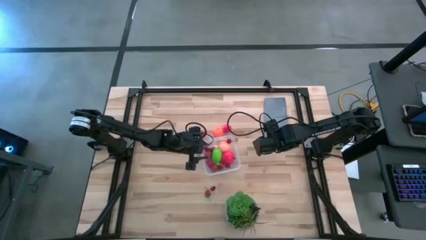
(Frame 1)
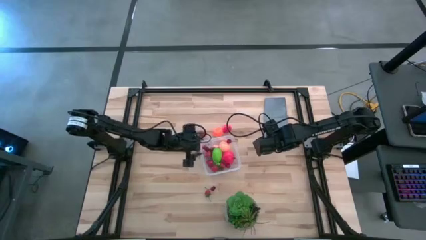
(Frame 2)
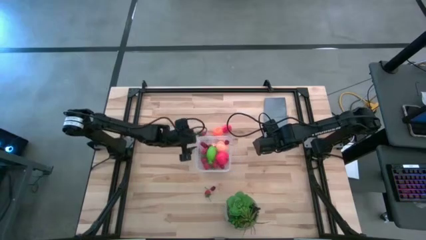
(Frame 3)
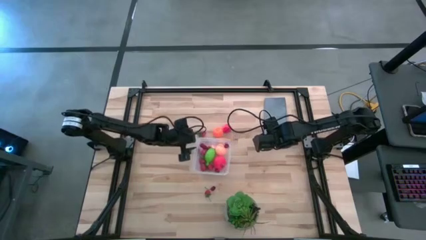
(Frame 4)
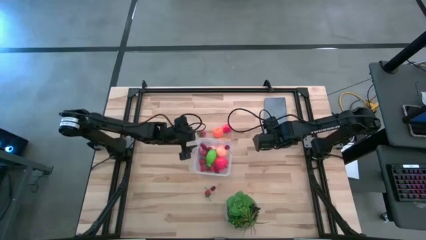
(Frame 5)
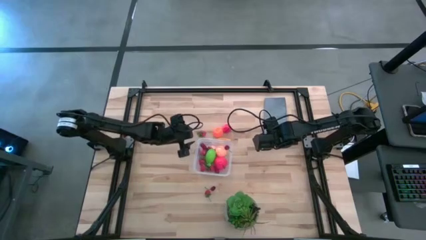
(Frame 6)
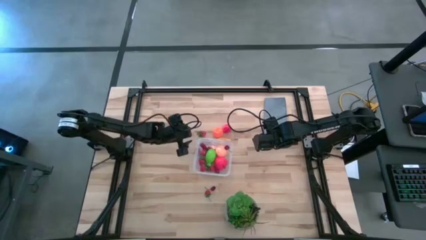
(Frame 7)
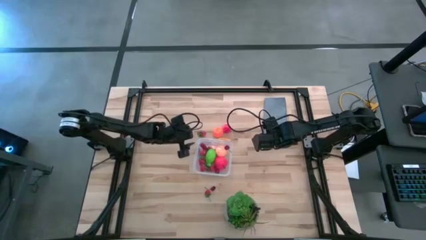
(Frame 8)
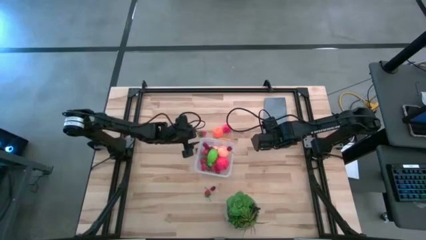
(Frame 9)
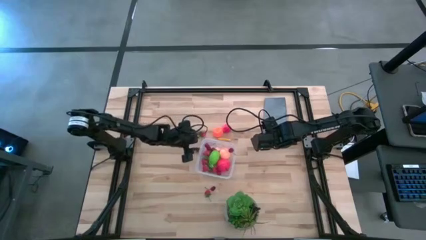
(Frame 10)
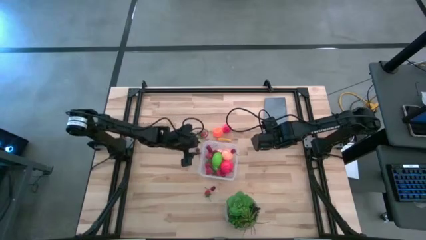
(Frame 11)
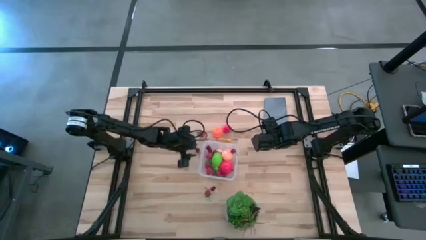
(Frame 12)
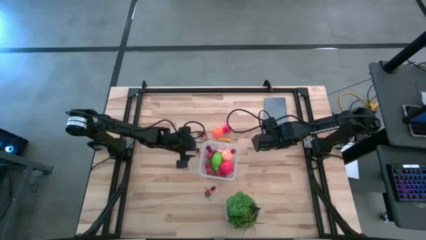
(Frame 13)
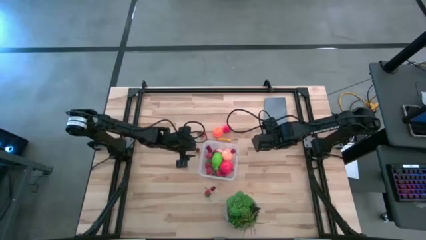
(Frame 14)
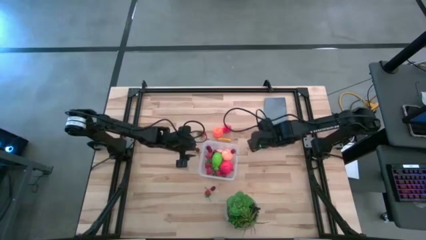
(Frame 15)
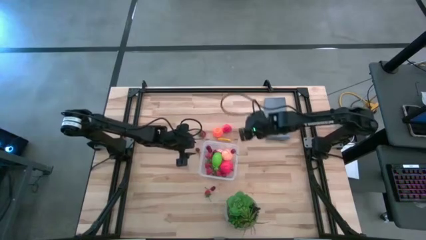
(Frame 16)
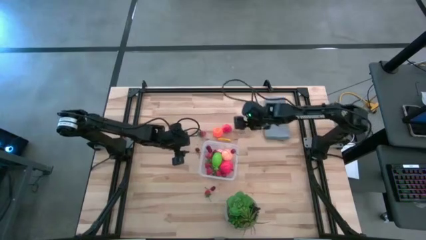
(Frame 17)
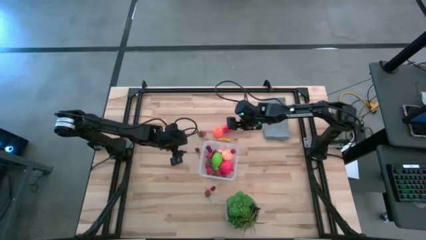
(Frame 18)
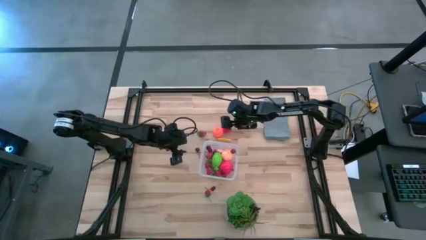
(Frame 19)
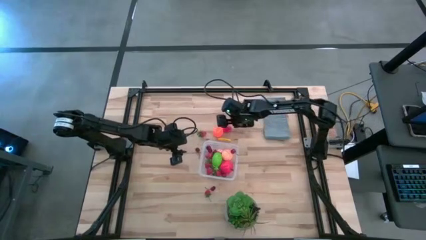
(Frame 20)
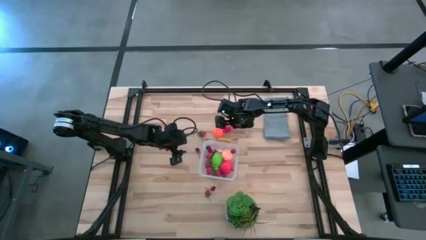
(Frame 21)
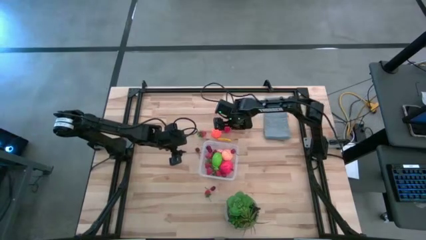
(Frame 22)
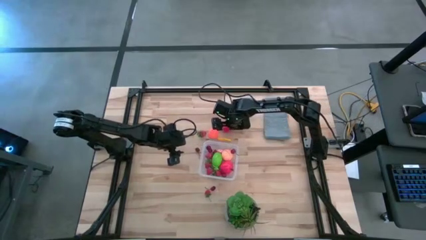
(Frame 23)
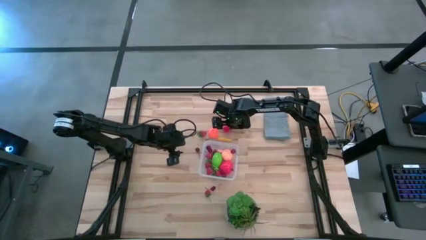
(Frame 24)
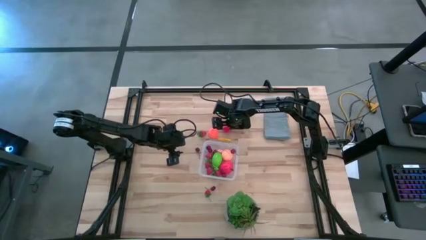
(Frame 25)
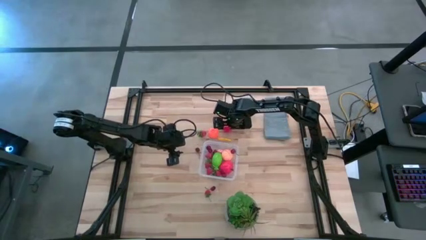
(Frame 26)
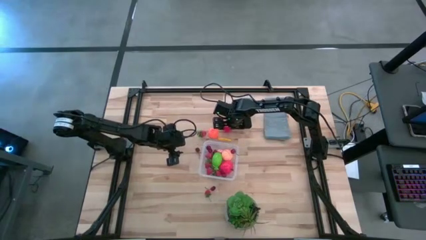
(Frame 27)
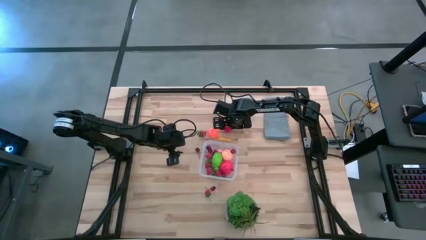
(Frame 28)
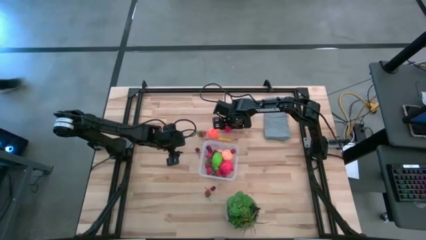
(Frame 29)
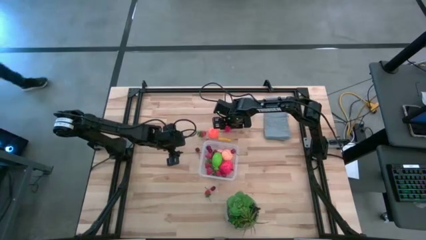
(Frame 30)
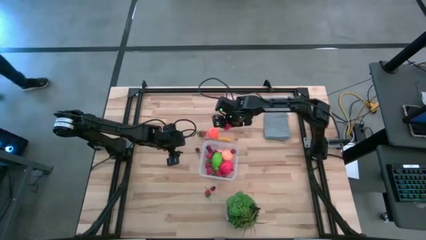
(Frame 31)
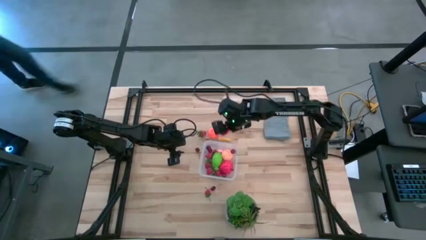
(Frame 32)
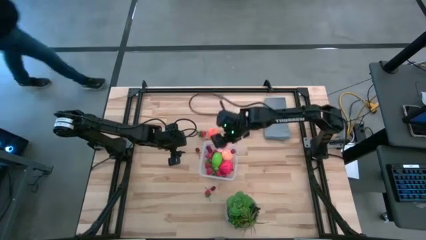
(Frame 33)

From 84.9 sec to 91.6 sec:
Task: Pick and placing Produce into tupperware
Put the red strawberry into the transparent container

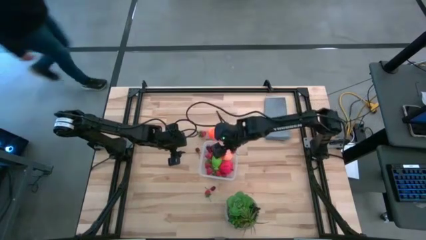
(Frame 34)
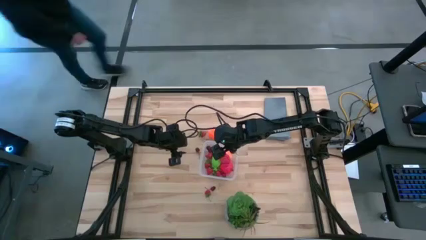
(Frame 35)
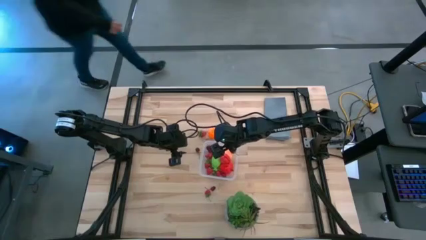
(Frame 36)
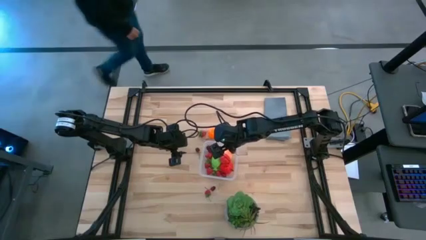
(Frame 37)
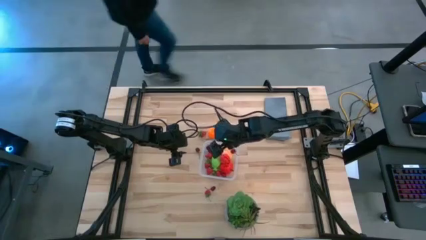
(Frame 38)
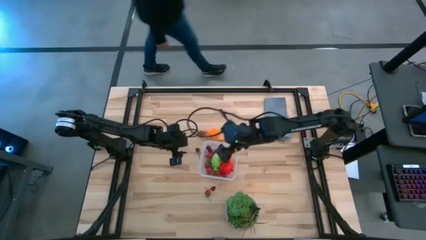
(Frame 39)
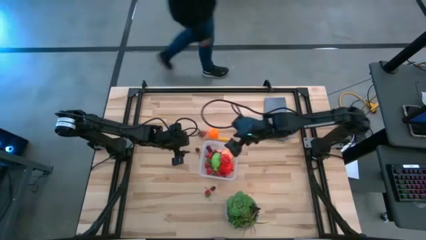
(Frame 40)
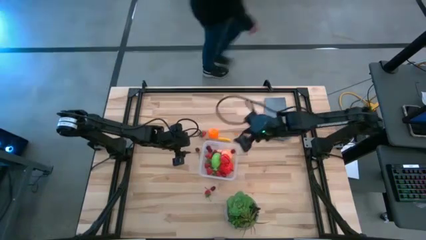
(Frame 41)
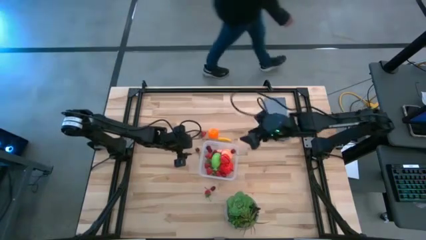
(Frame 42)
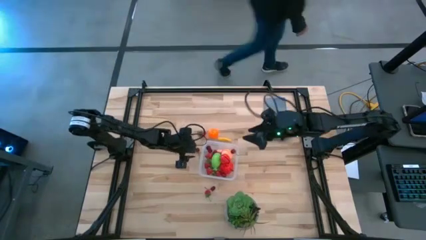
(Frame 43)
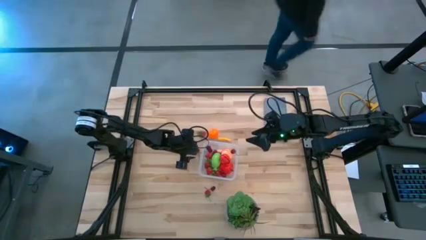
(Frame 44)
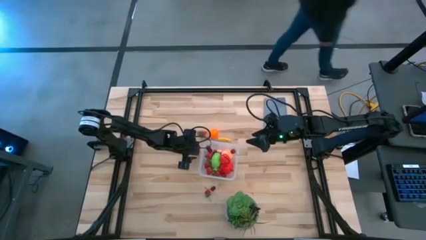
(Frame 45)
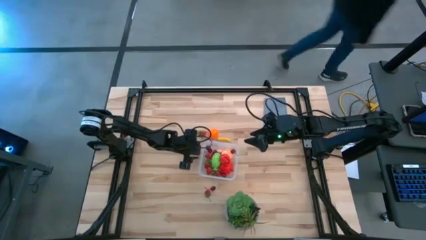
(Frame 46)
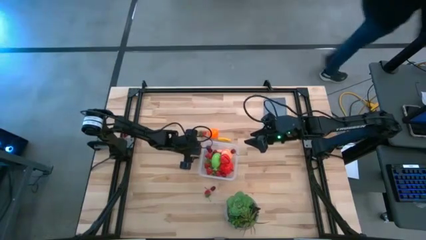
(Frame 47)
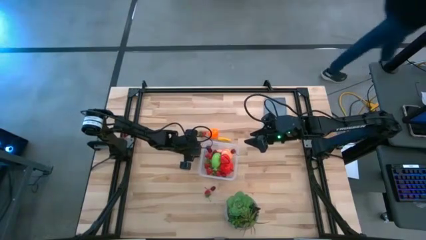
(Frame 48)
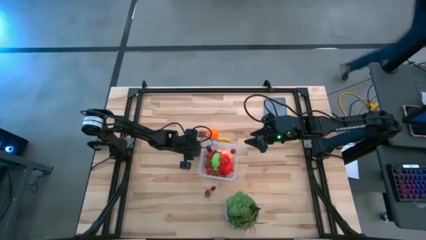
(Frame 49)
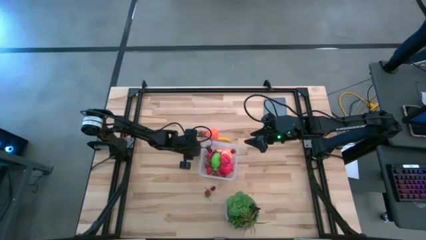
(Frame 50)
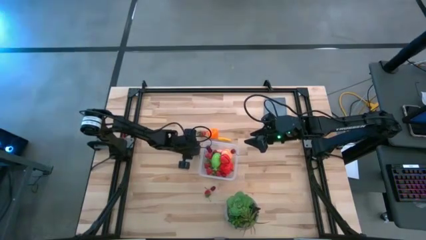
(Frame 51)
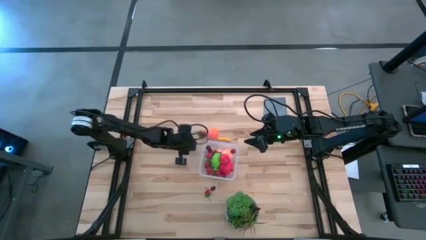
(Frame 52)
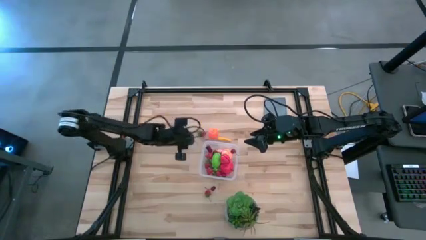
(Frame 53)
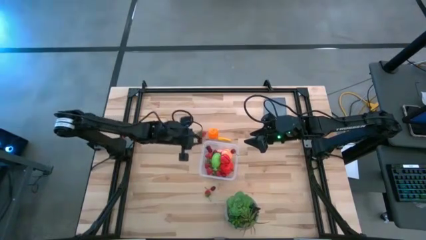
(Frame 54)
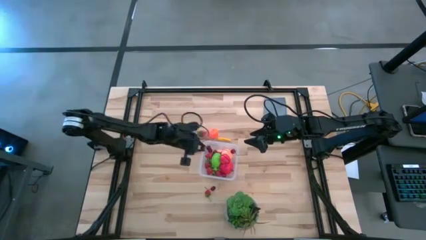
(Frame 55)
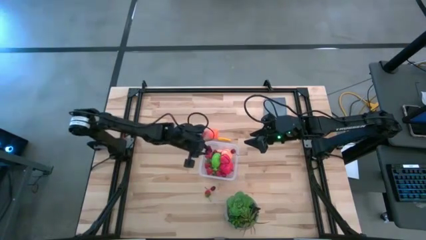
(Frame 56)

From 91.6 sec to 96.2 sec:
Put the red cherry into the transparent container

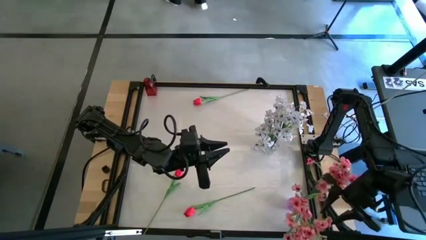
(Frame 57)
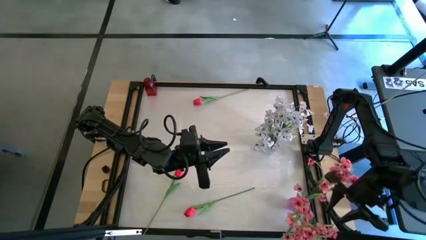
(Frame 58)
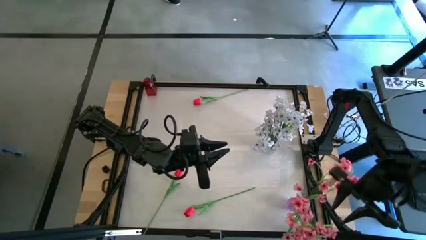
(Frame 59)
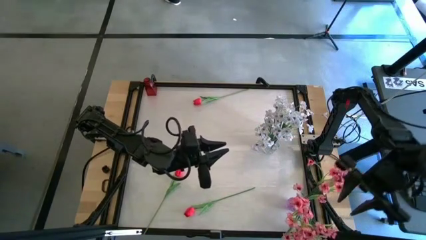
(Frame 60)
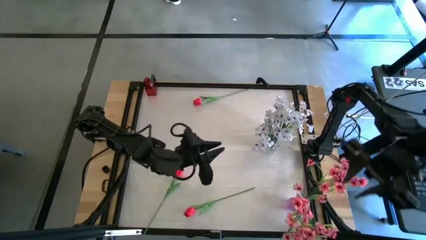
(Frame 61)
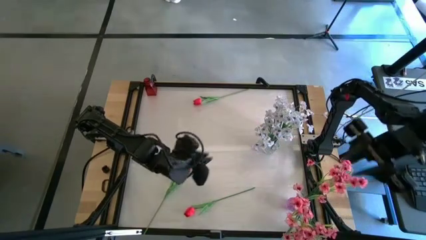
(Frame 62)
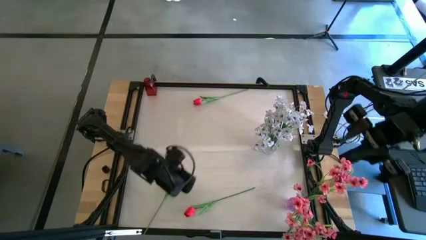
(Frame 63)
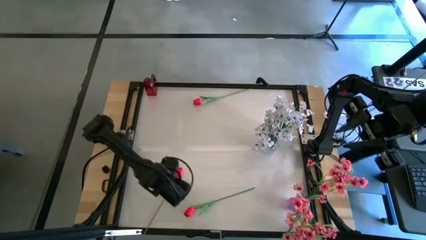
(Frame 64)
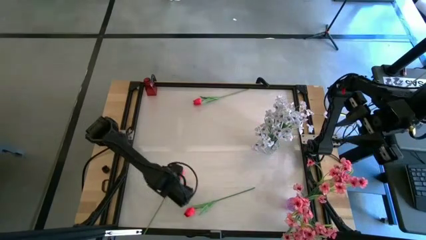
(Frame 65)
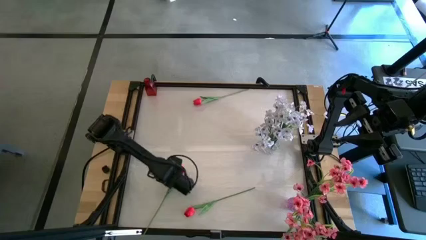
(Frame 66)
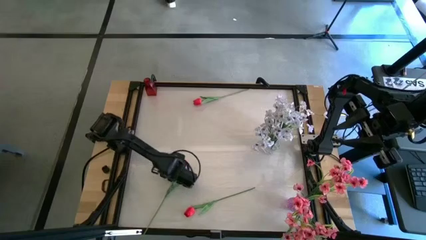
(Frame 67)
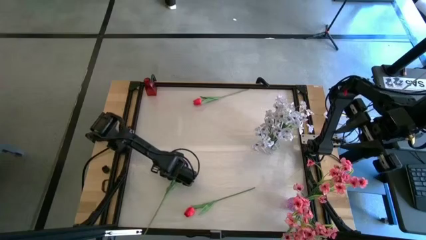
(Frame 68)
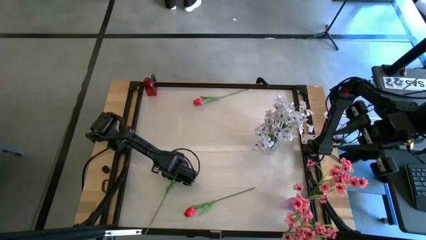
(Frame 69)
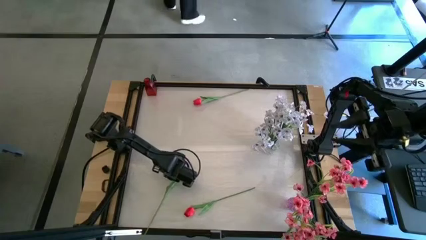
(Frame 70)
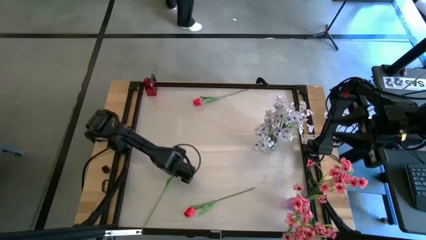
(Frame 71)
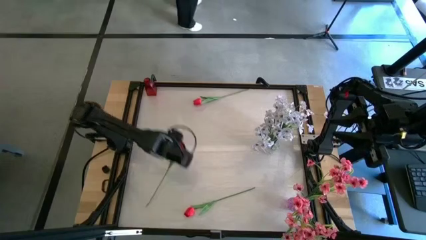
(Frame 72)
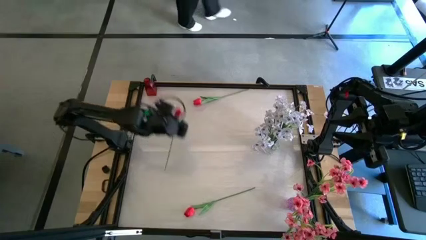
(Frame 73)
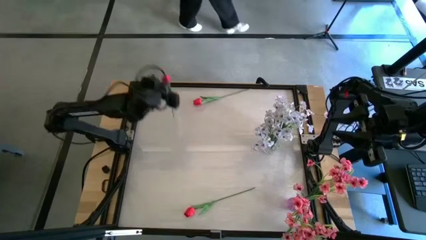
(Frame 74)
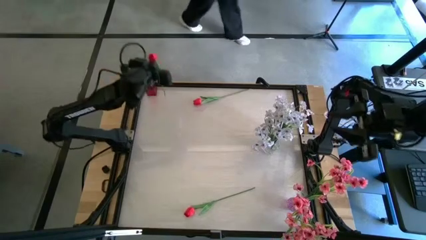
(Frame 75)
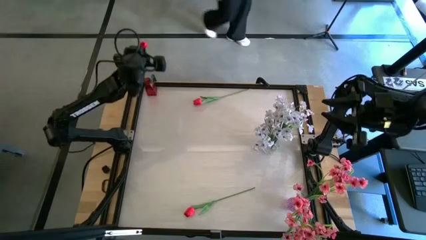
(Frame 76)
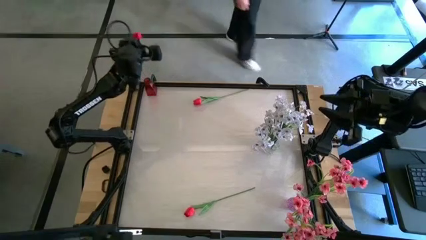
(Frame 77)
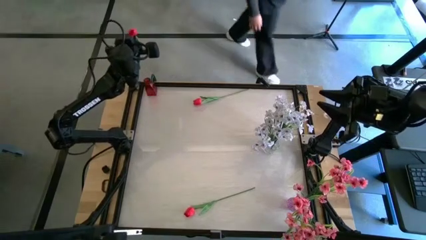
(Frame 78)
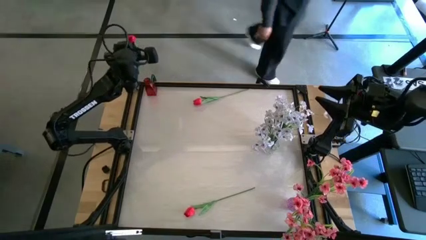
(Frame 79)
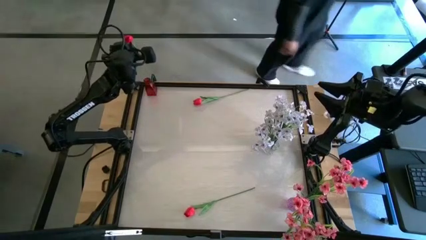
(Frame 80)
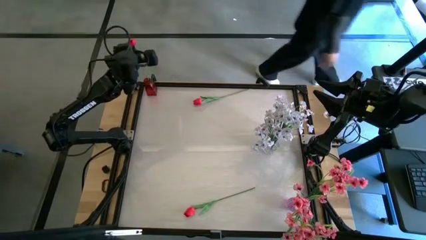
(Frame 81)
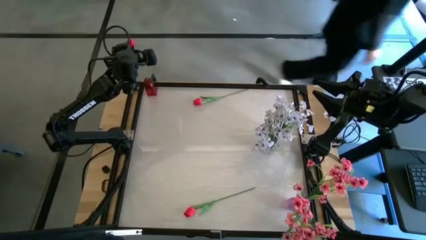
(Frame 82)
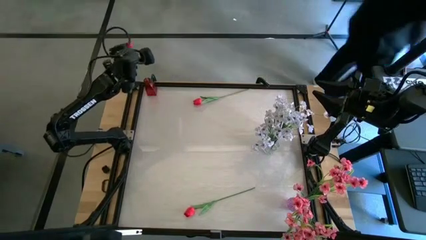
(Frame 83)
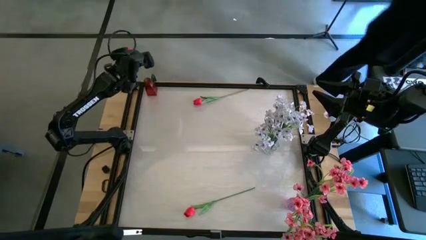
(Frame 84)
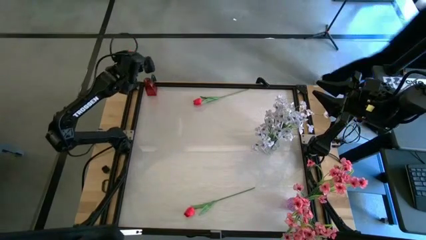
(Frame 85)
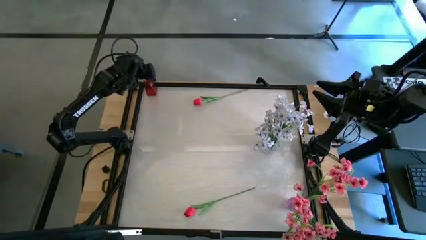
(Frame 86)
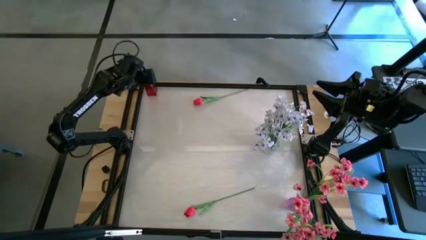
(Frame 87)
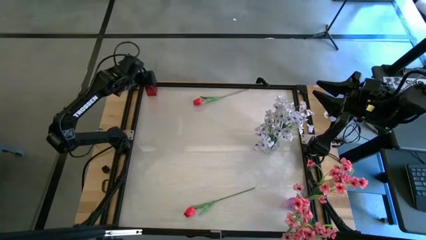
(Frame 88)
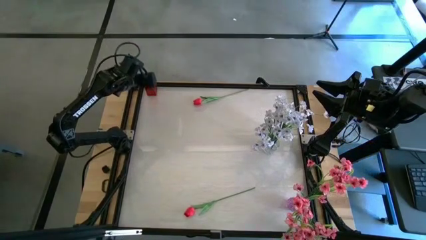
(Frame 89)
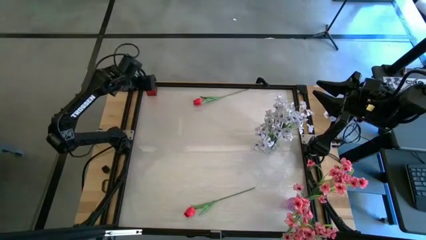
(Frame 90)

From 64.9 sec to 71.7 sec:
Task: Sort flowers into vase by color
Put the middle red tulip into the red vase
